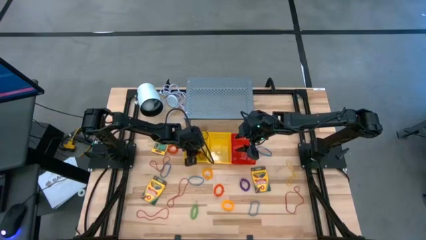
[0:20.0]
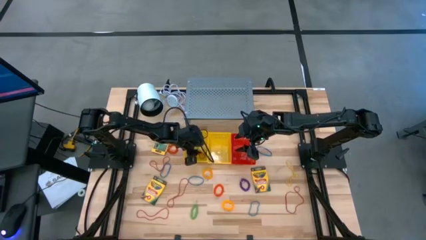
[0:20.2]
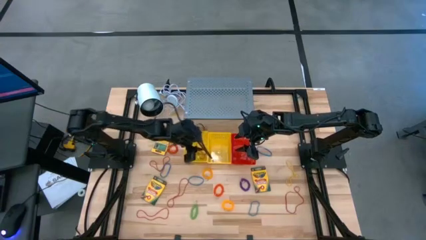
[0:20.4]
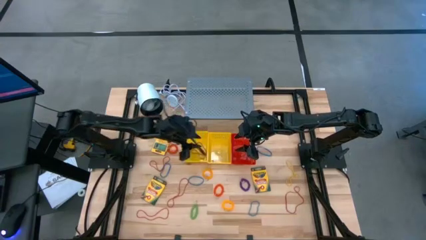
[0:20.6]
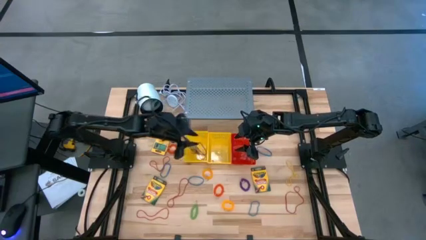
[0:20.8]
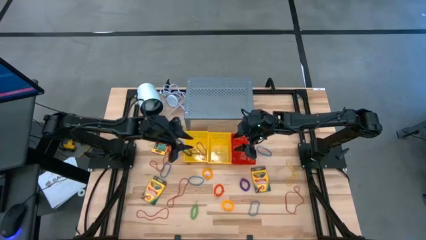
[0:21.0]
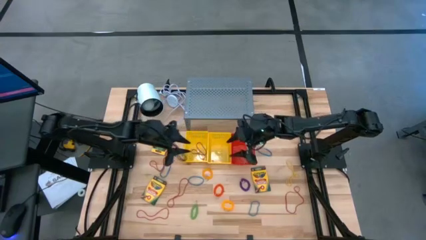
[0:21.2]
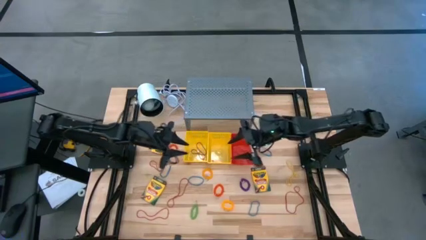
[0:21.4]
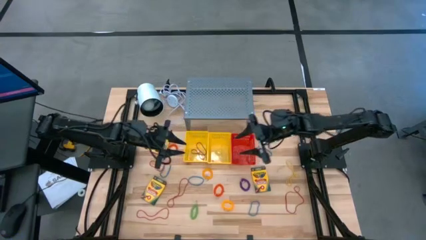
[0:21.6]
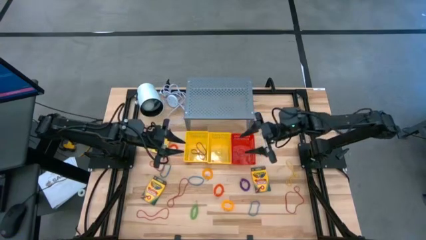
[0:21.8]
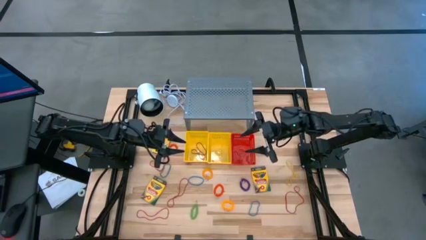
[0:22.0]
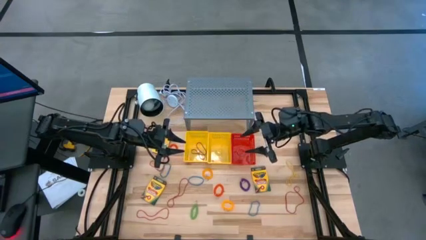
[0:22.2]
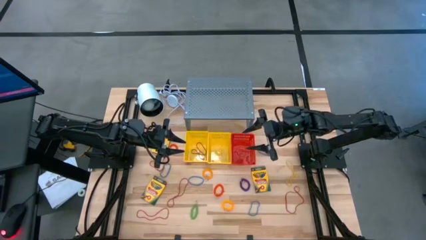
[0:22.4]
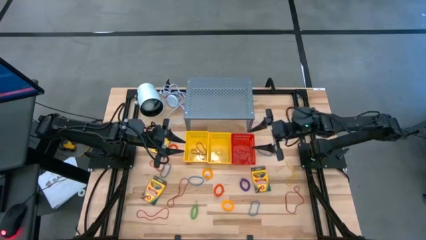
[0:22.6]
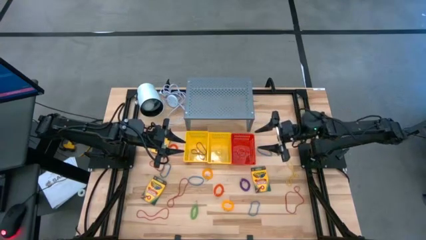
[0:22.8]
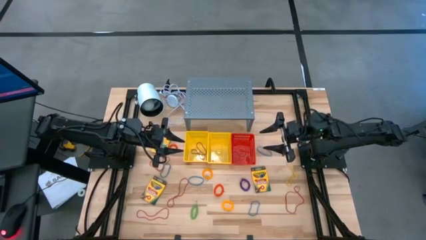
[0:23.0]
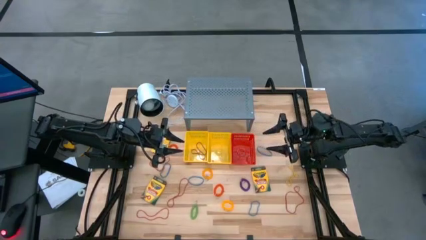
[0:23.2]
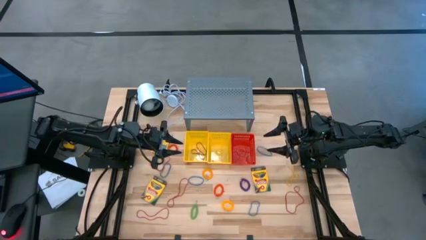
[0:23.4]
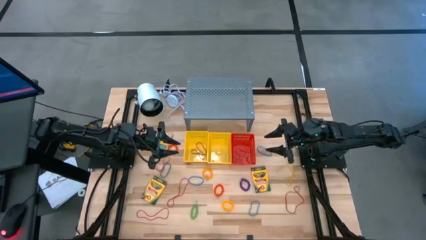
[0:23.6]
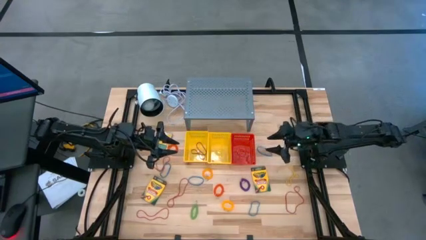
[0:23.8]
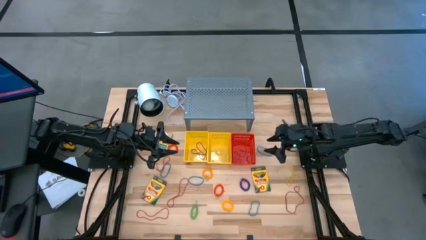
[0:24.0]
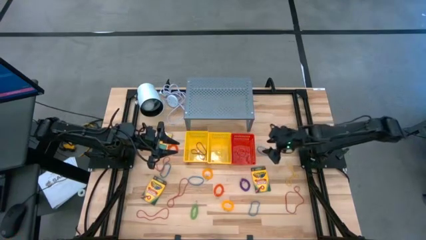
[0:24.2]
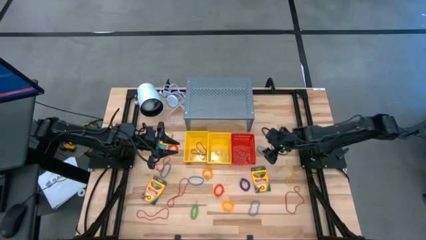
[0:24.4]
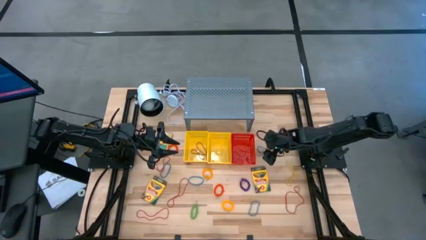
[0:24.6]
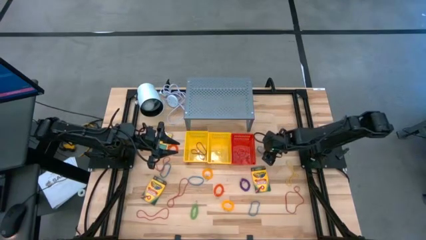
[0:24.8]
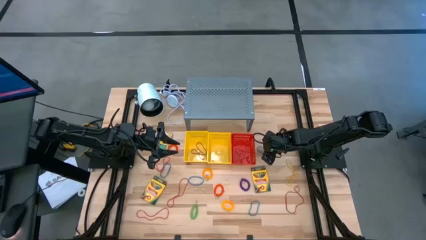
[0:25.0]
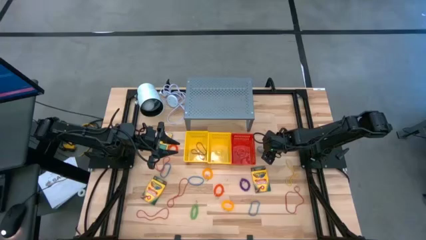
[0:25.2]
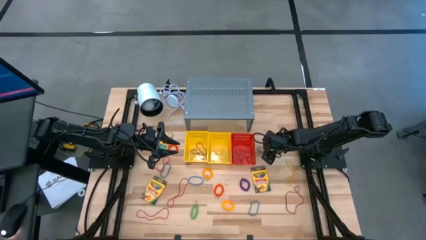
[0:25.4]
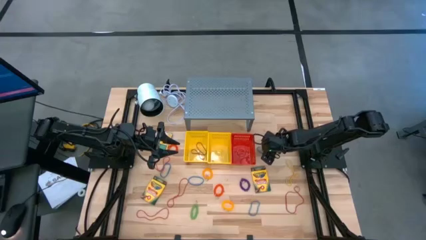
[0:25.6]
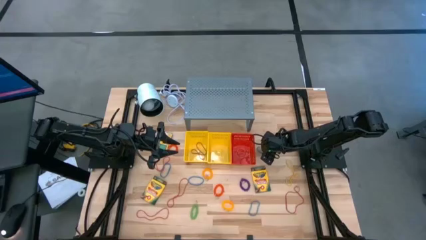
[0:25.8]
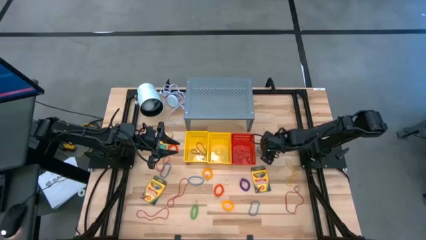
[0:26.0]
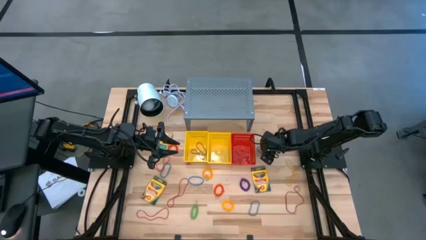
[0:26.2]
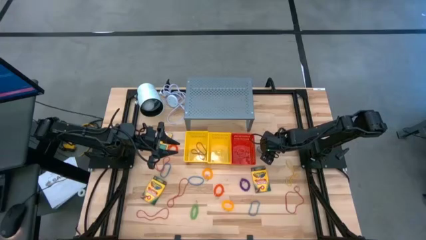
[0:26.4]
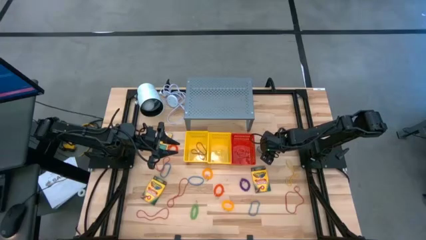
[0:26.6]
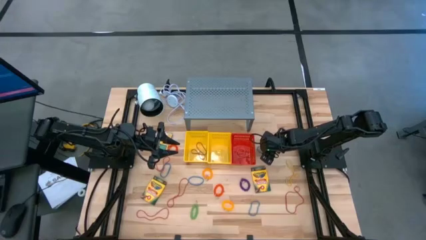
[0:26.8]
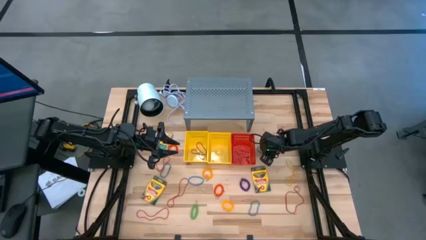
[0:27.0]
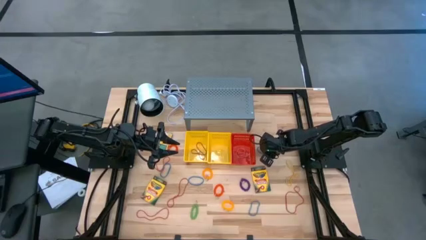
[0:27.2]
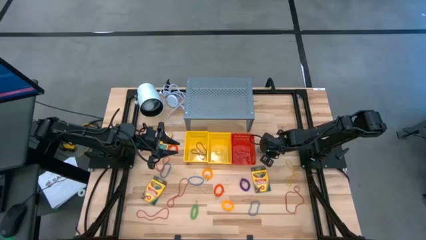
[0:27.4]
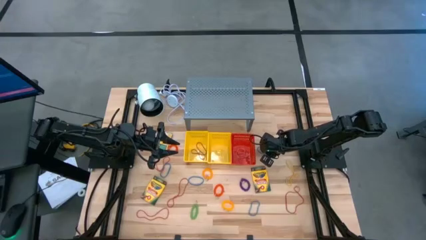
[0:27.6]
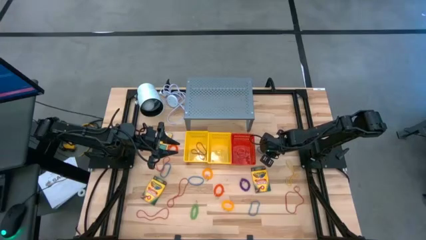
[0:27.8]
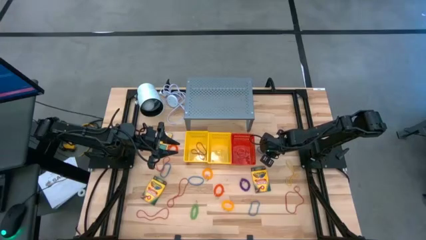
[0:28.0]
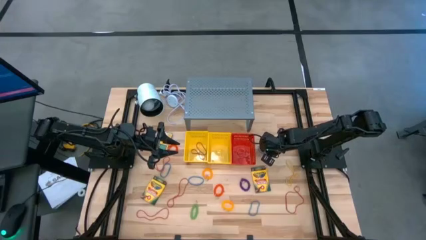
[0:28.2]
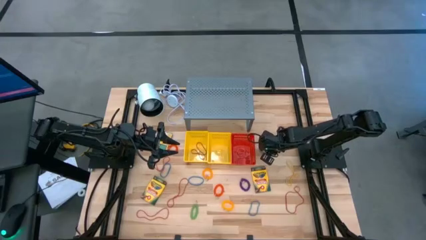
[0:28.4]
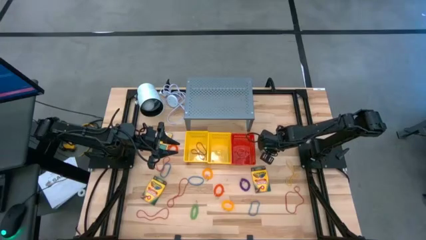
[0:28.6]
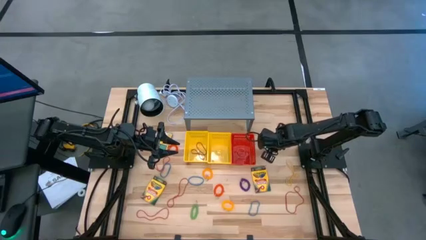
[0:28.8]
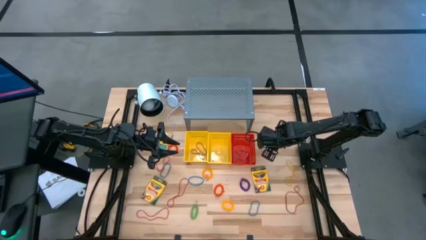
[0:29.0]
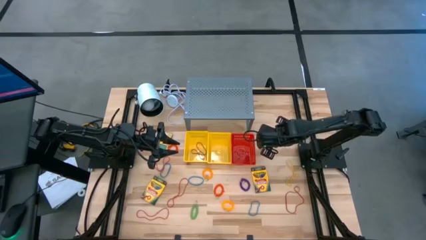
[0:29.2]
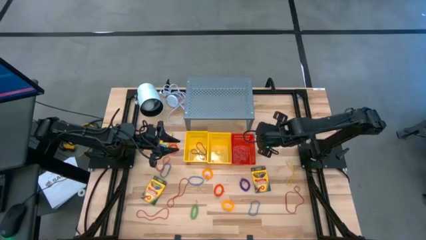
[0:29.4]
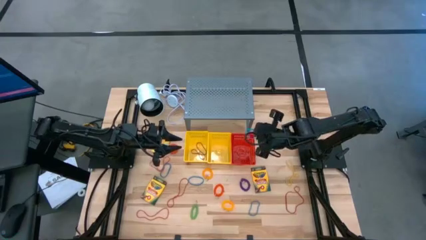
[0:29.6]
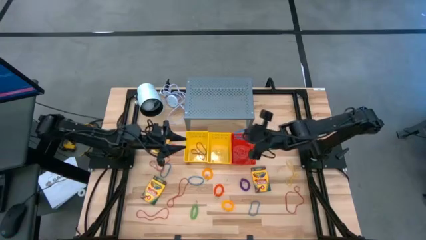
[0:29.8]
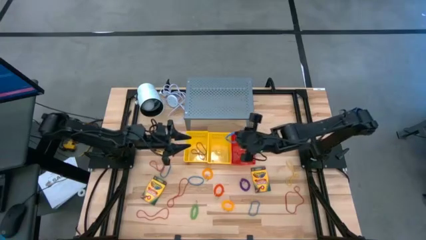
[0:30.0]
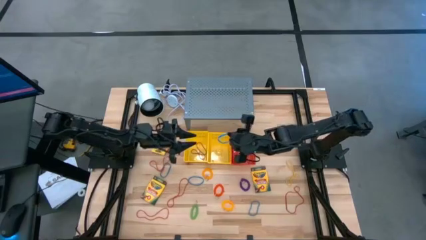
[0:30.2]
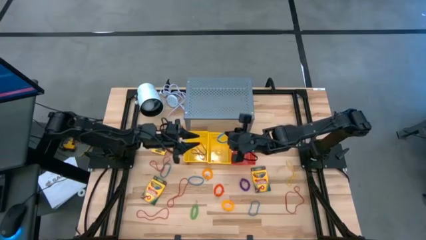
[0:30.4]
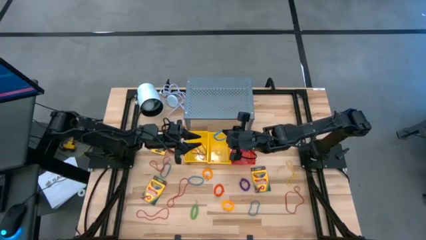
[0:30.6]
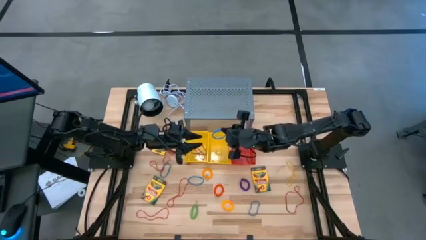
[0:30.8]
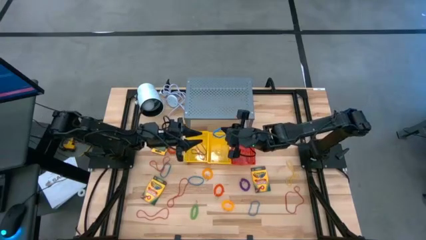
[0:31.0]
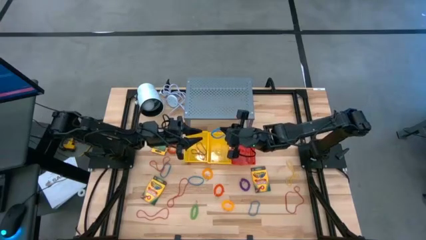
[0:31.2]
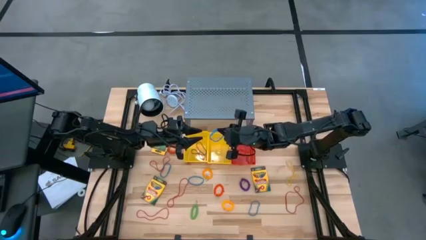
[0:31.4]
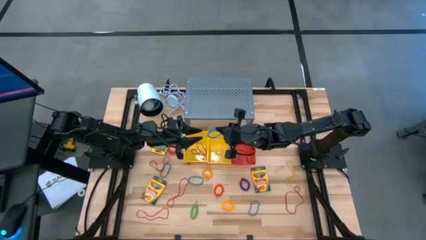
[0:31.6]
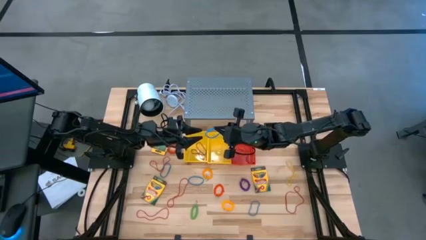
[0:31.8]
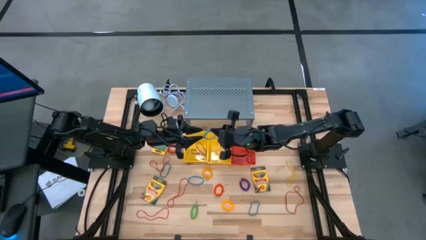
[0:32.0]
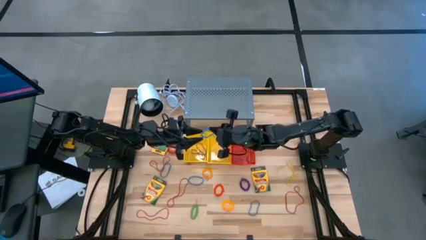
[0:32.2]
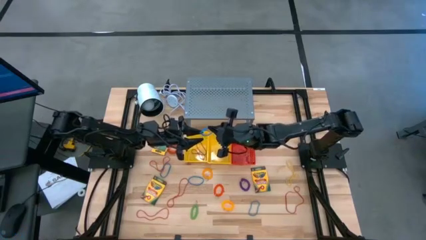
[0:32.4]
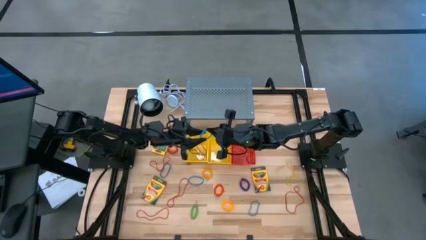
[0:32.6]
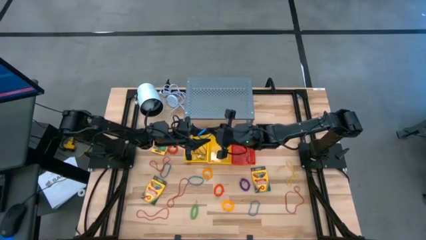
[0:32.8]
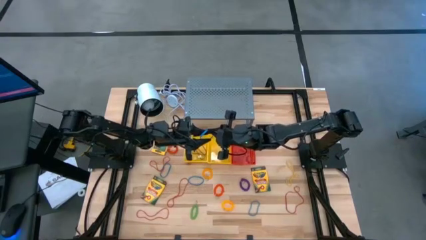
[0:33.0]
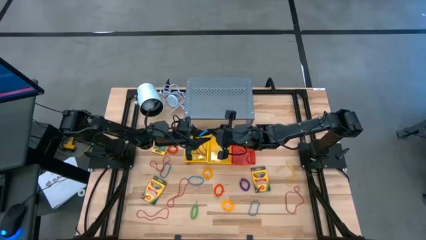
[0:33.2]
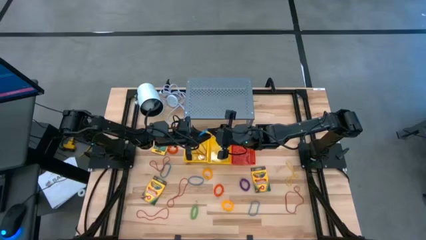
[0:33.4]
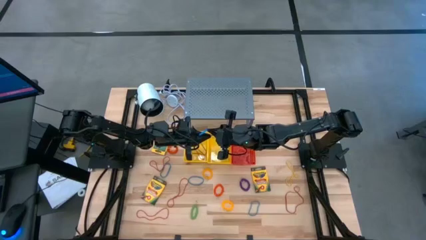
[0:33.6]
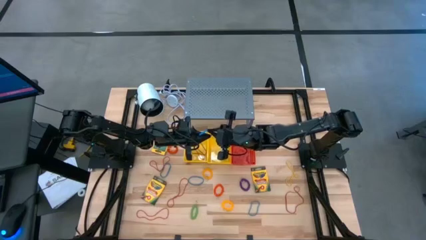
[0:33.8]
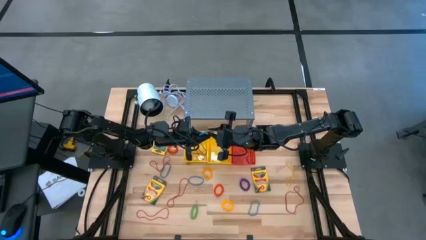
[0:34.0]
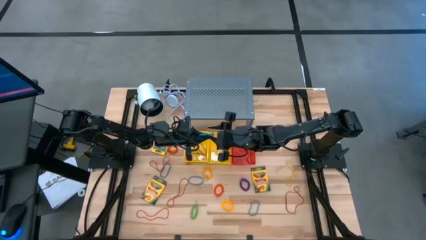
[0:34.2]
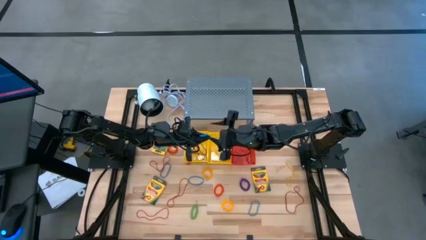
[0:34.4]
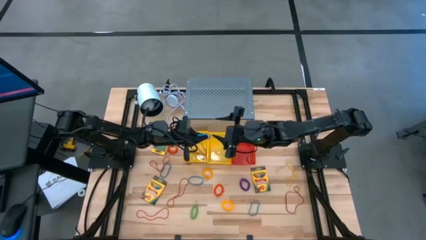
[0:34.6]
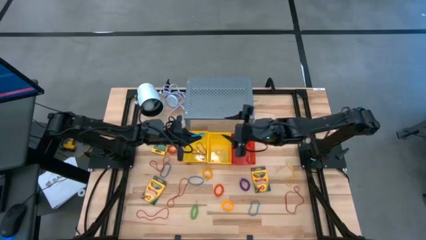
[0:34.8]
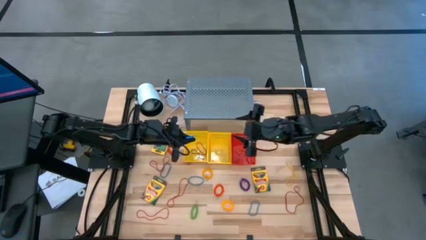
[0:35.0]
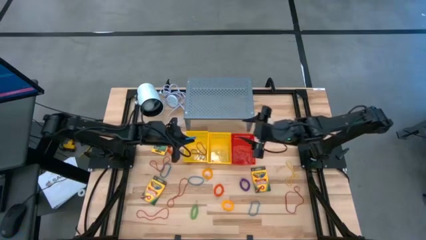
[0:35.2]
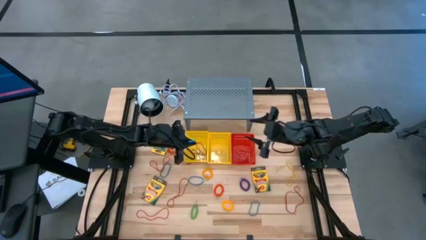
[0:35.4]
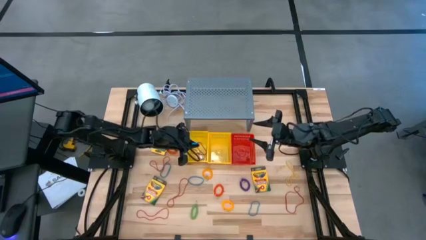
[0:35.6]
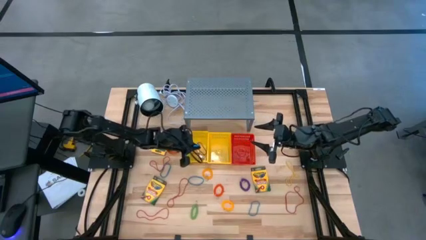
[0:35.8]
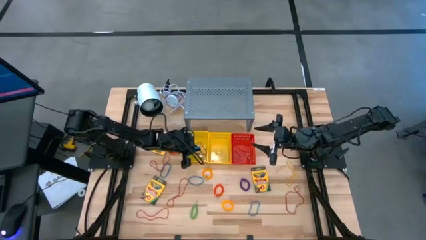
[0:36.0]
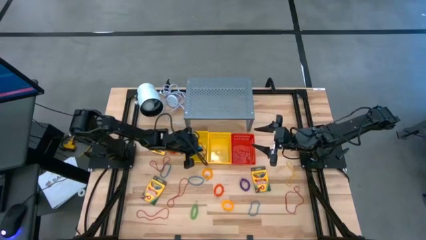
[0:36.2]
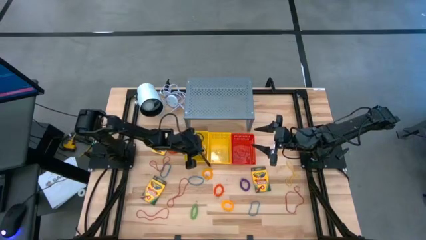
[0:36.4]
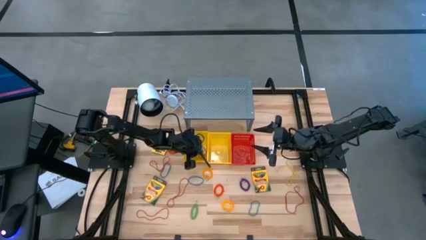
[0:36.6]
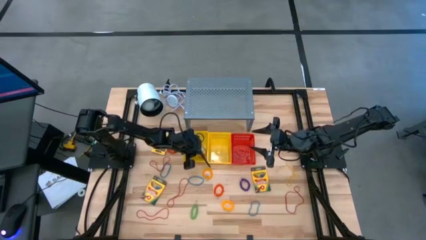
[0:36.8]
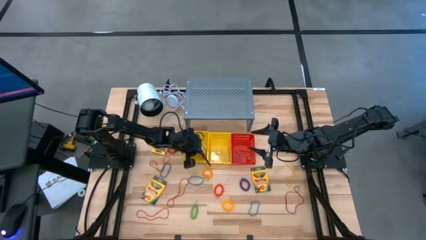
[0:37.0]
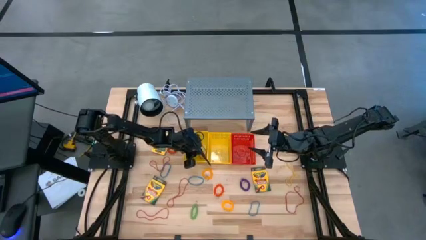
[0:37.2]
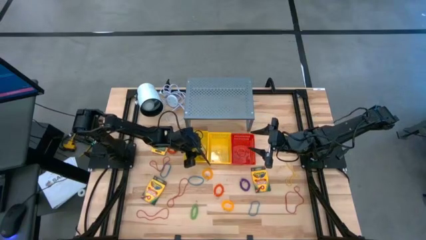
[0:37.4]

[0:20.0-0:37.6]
Task: Pick & Place Office Desk Supplies
Put the blue rubber band into the left yellow basket
